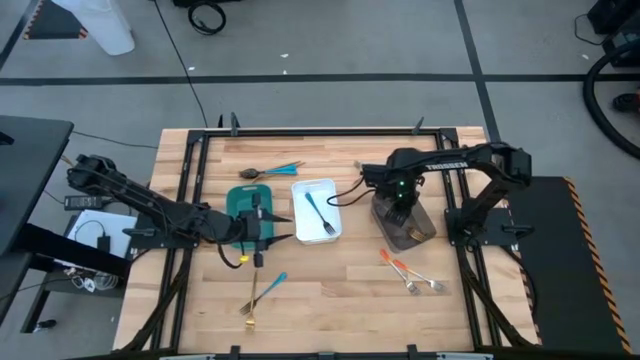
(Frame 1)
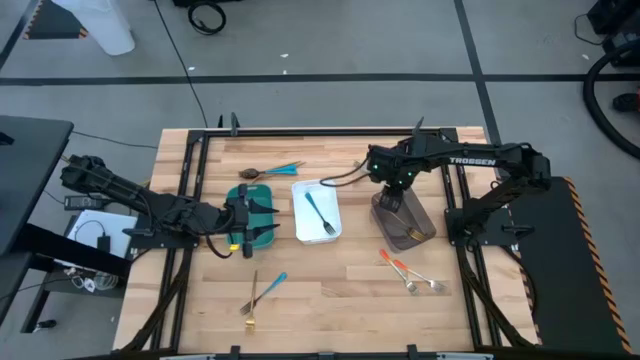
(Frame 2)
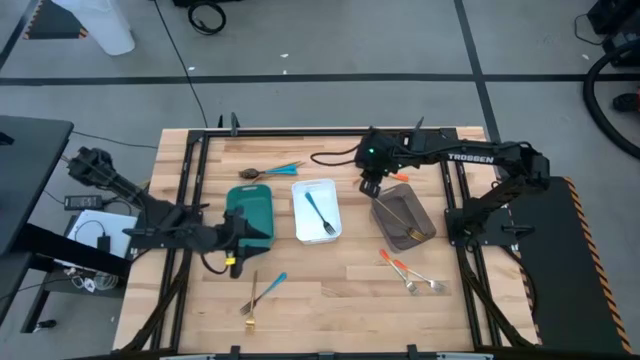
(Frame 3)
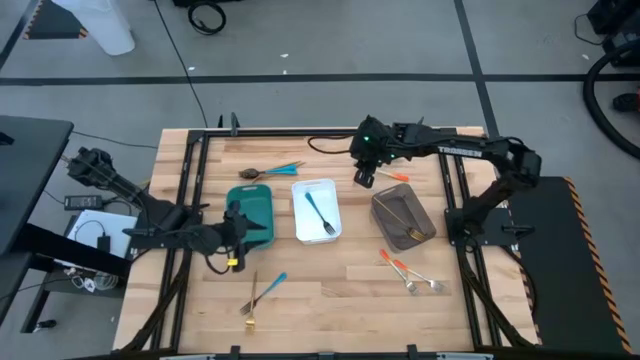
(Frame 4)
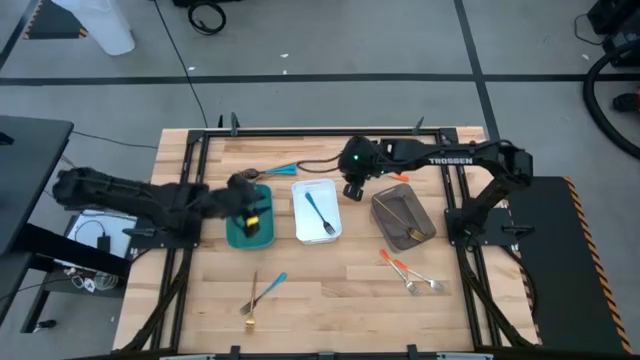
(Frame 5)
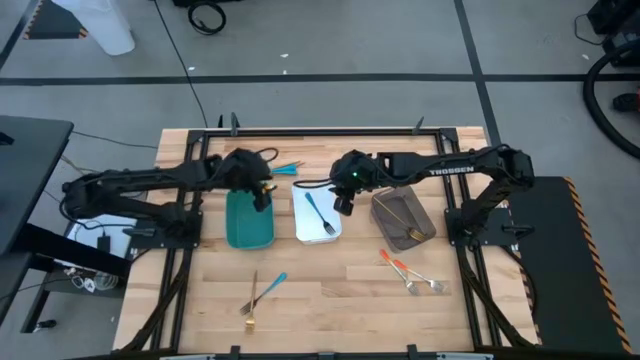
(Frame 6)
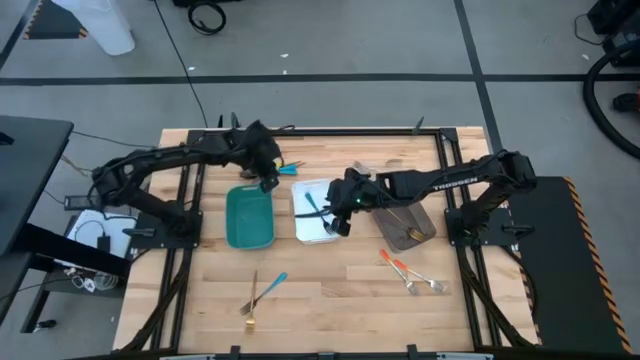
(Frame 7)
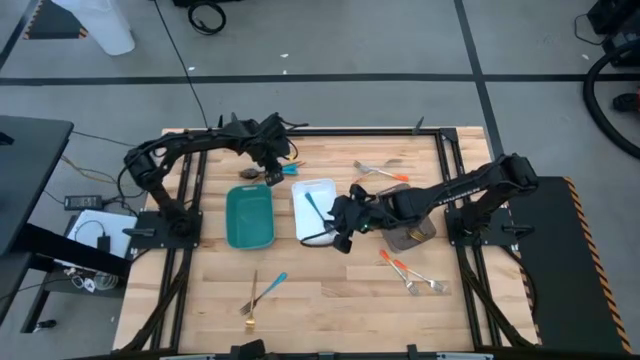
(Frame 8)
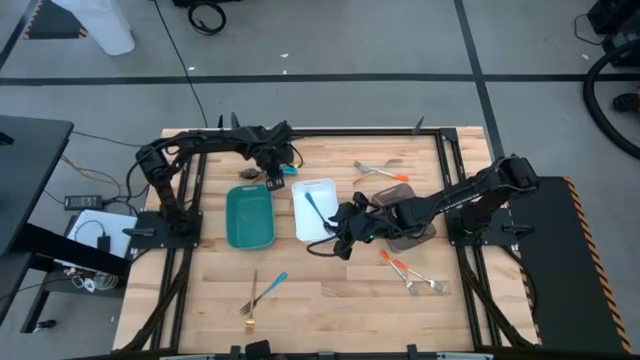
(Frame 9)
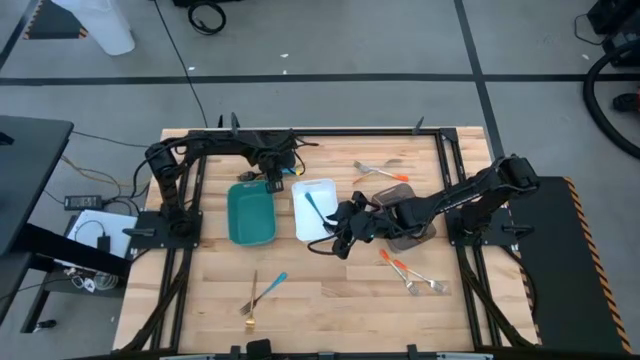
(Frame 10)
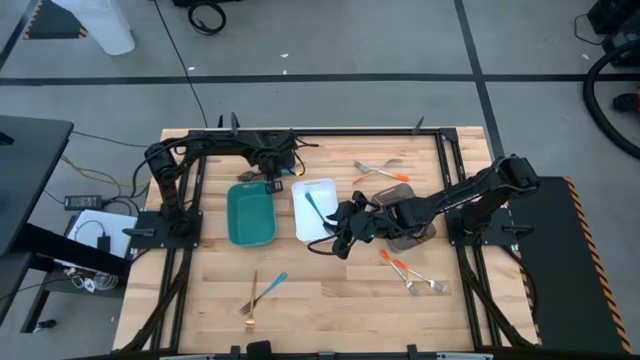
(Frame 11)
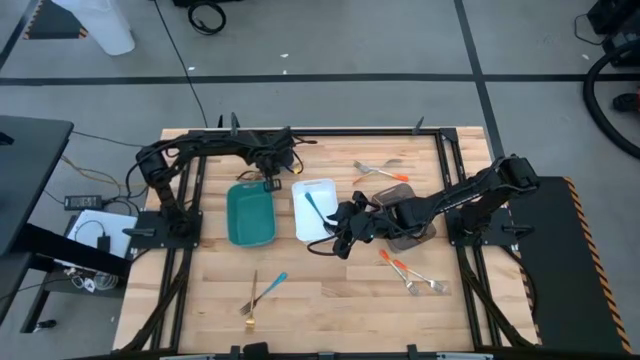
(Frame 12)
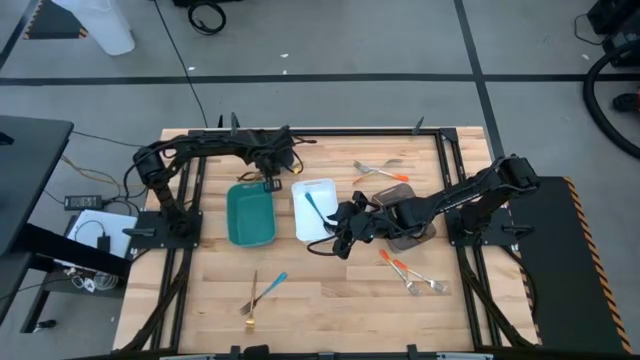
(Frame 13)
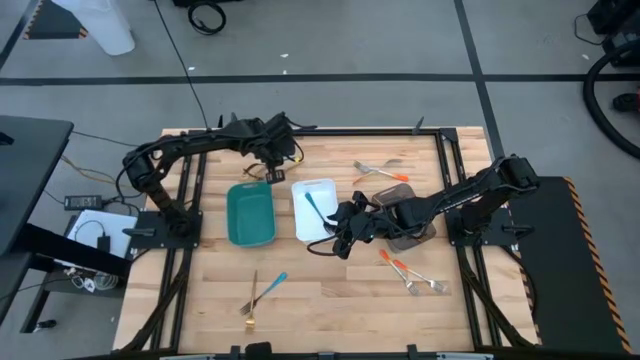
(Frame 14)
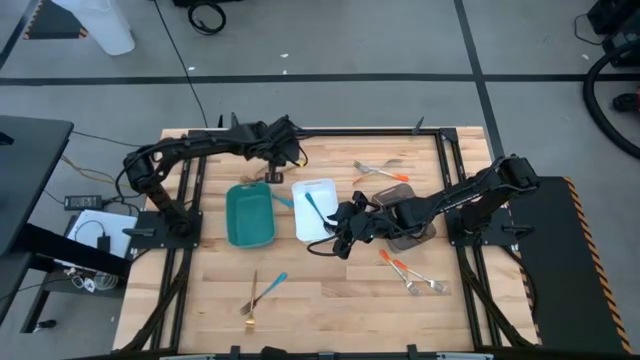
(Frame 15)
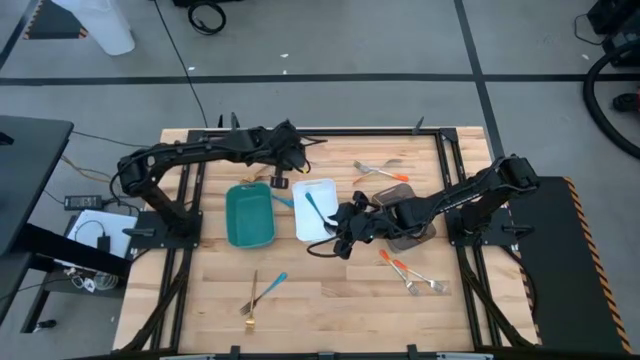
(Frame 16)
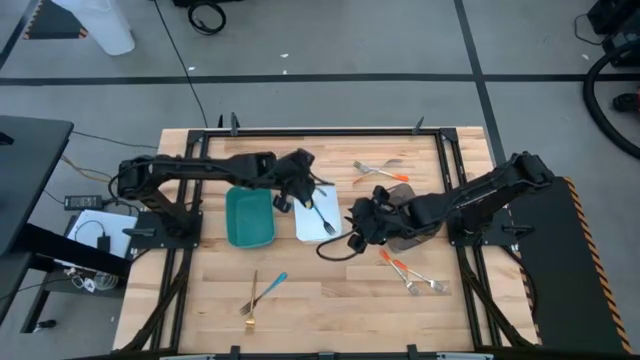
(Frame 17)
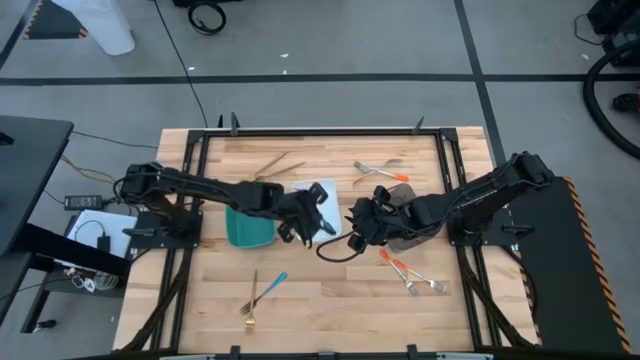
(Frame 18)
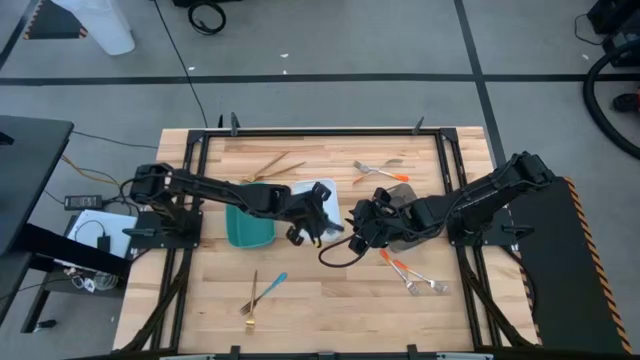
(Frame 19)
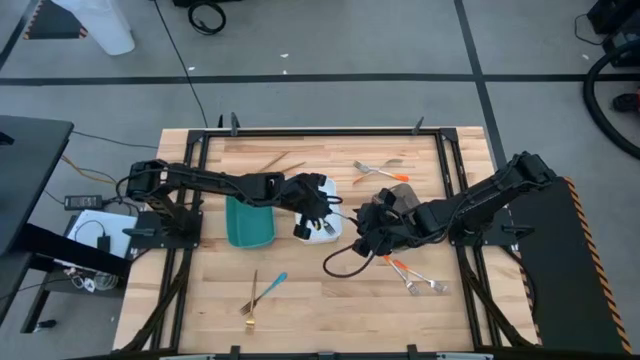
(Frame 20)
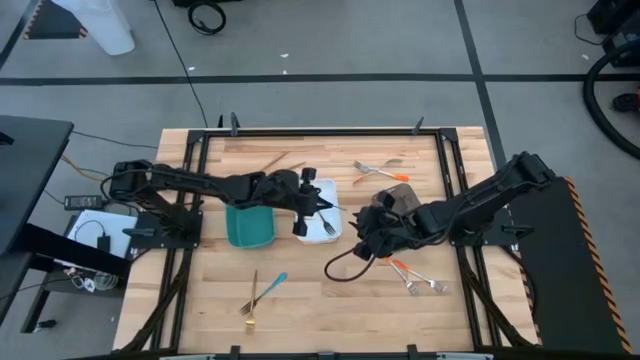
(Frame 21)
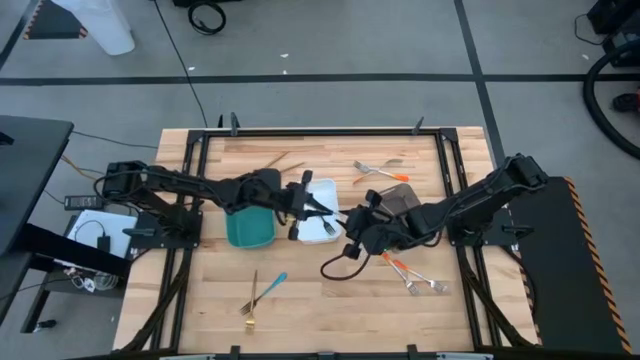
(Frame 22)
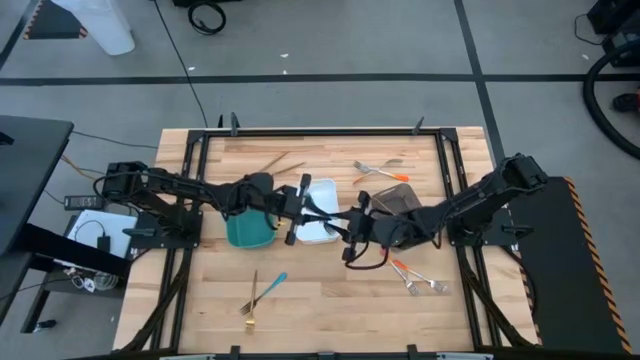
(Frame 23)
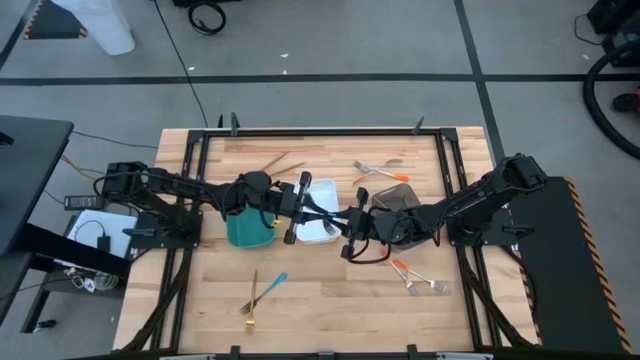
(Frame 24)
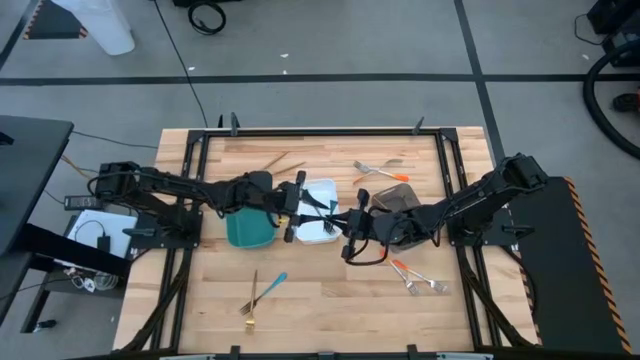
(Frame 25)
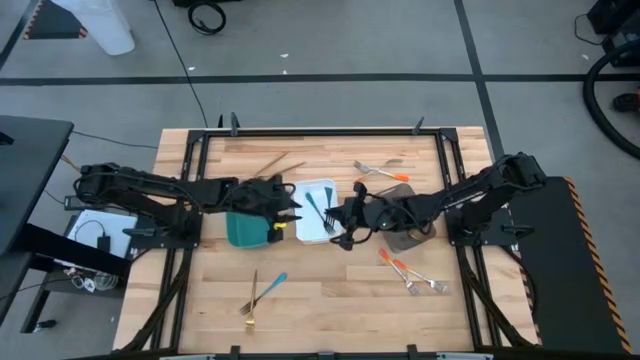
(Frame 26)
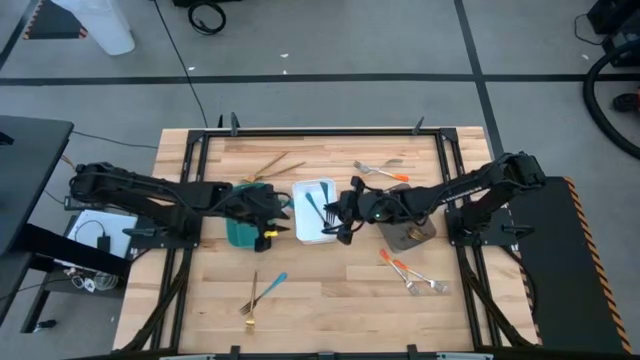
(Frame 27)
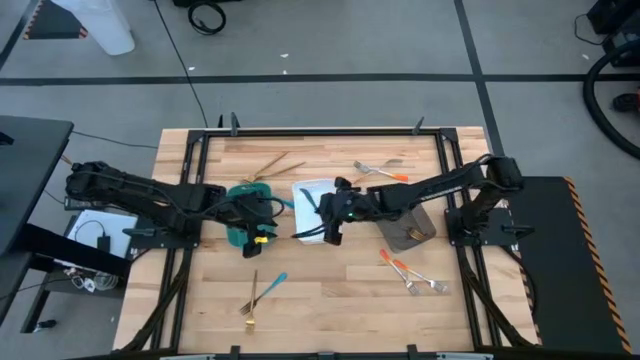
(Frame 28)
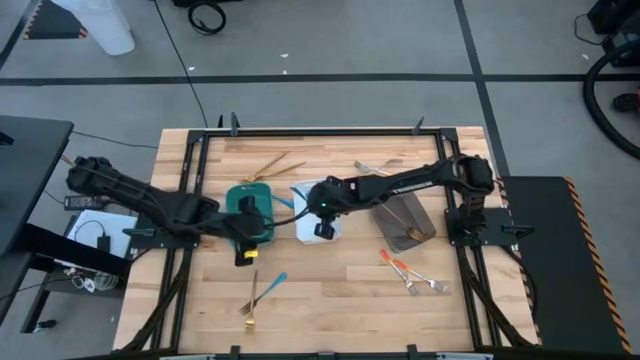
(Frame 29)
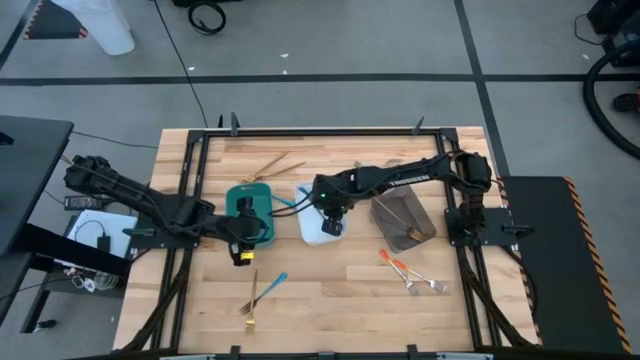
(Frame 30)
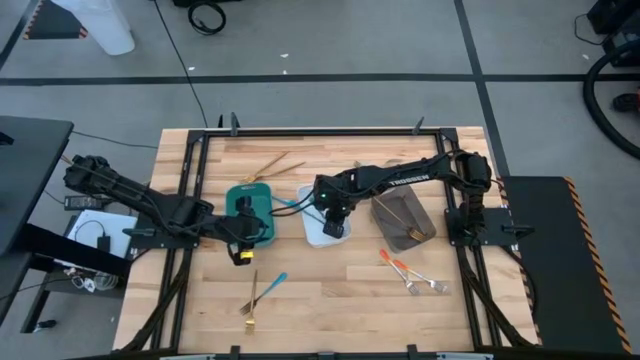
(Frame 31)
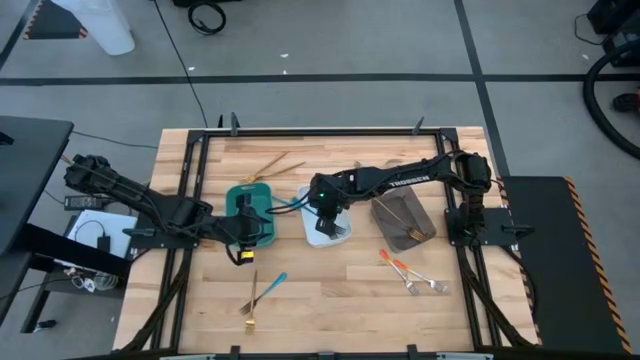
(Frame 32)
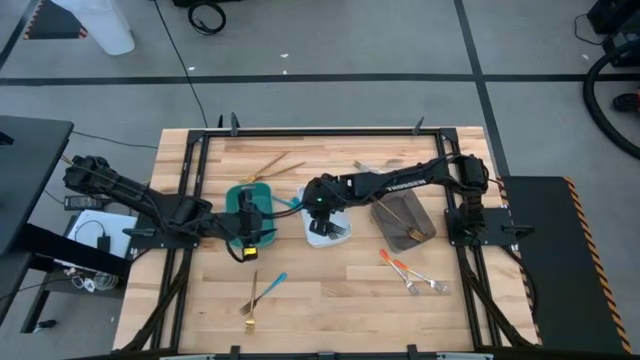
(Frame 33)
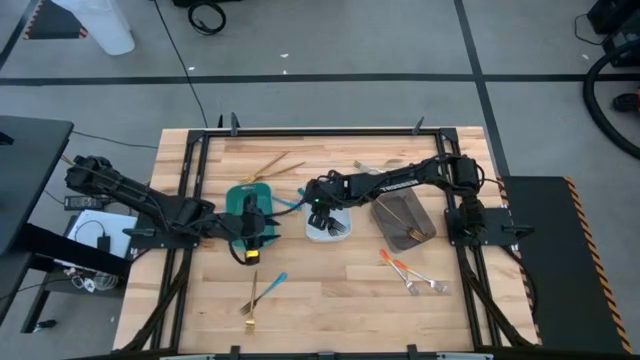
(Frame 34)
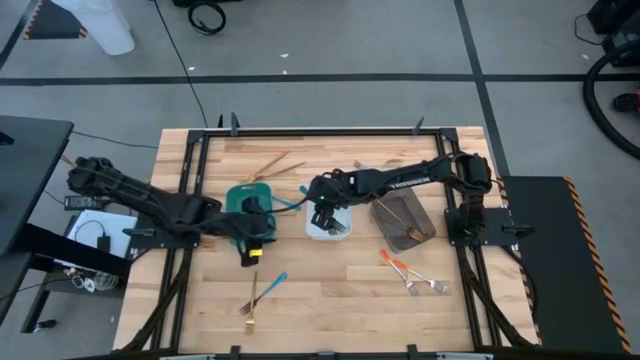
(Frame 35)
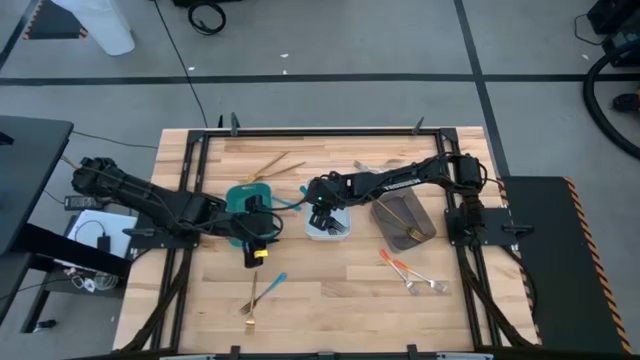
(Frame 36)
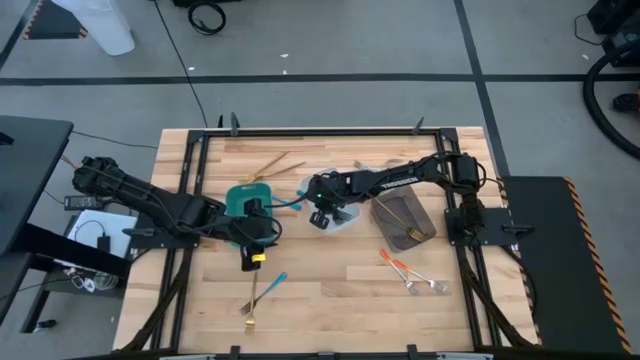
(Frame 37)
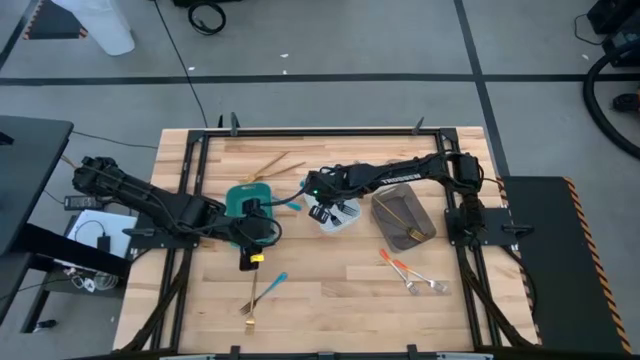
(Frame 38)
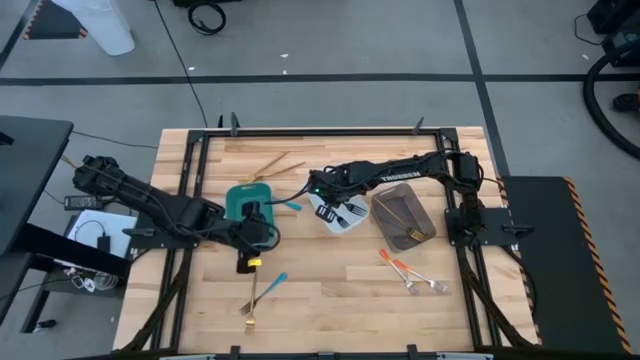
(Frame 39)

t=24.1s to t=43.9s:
Task: Sort silverware by color (type)
Put the blue fork into the white bin

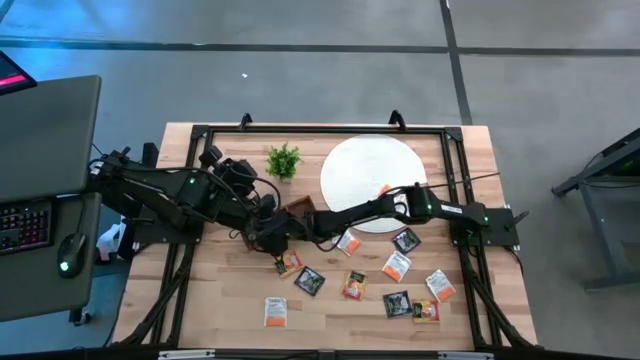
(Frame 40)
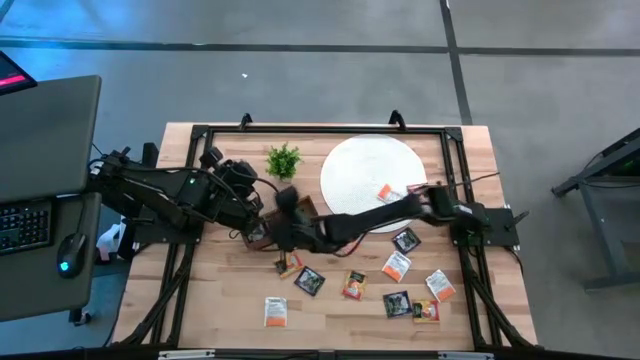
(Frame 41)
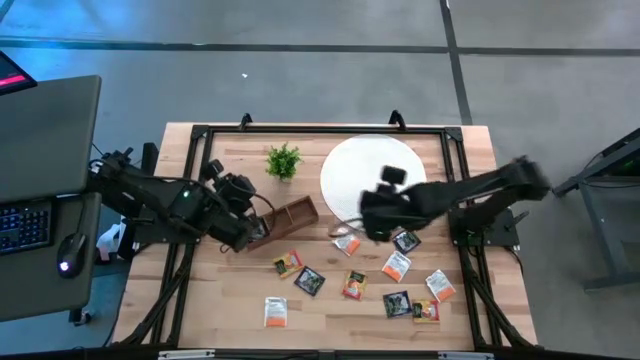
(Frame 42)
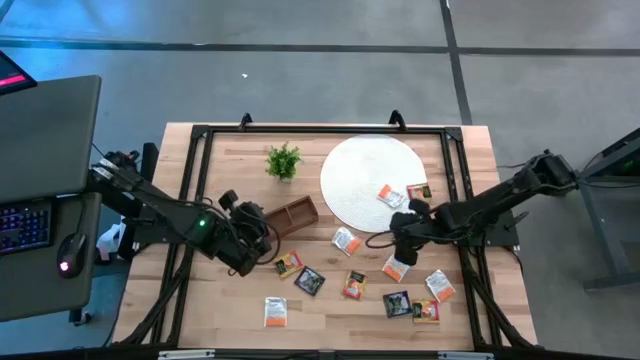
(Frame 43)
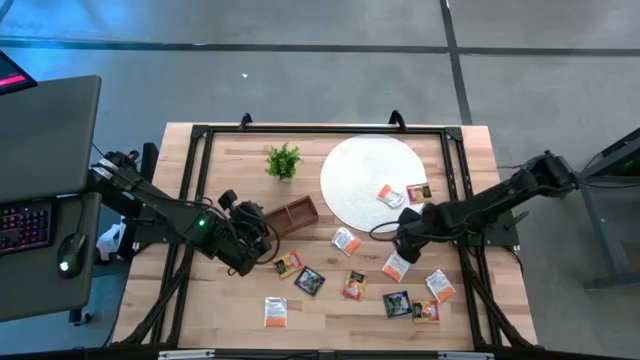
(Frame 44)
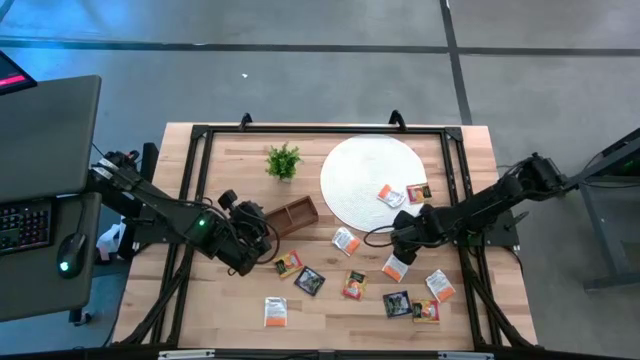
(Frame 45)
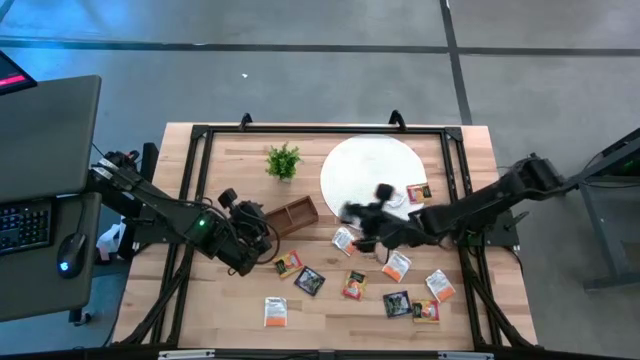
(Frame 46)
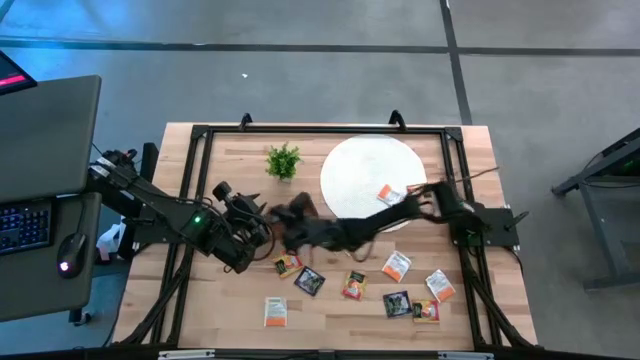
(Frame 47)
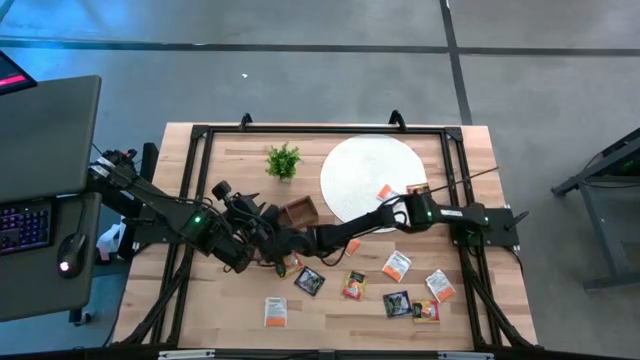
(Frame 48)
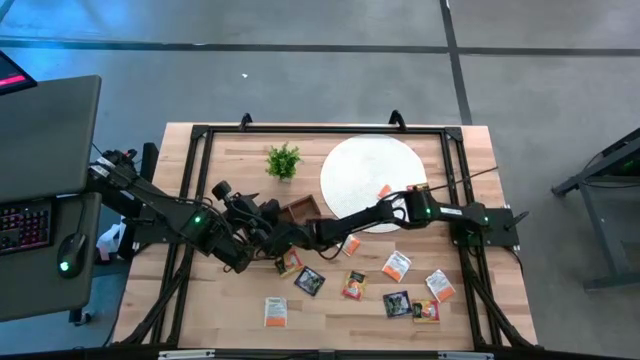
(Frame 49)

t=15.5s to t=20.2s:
Task: Pick & Place Tea
Put the purple tea bag into the left section of the wooden organizer
